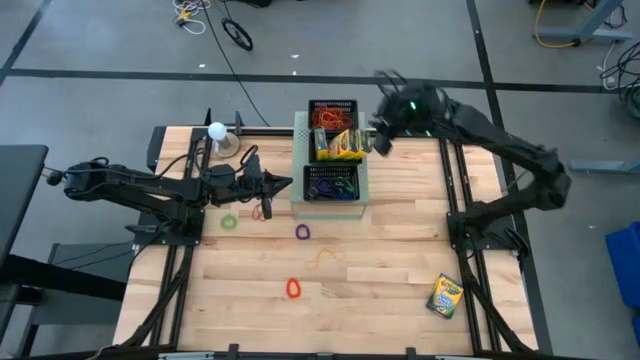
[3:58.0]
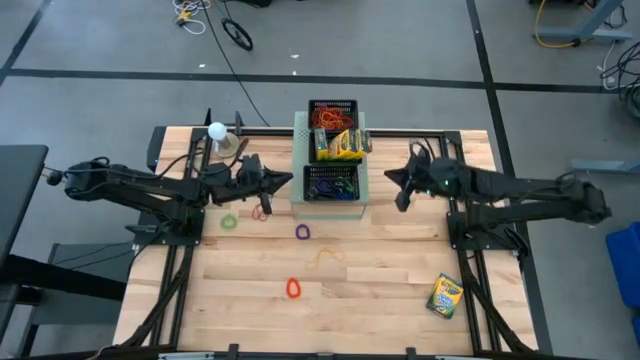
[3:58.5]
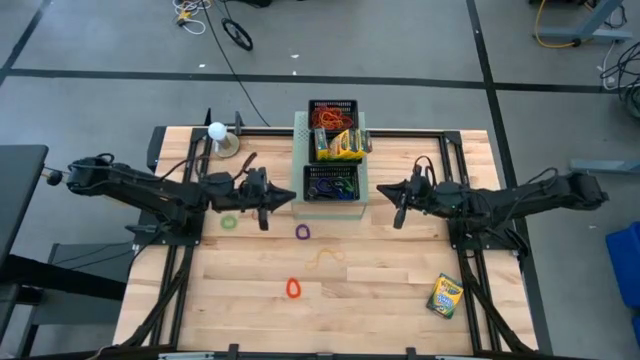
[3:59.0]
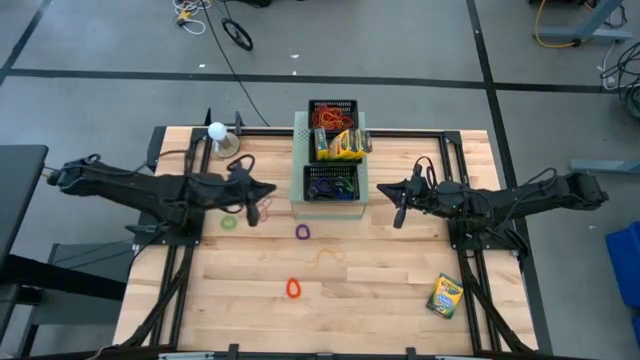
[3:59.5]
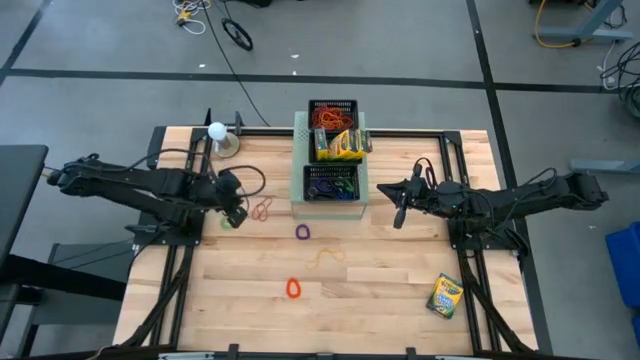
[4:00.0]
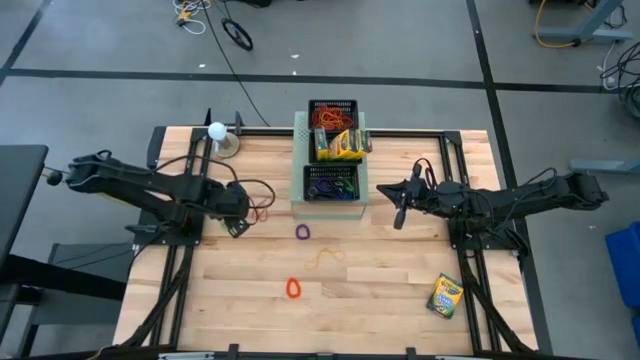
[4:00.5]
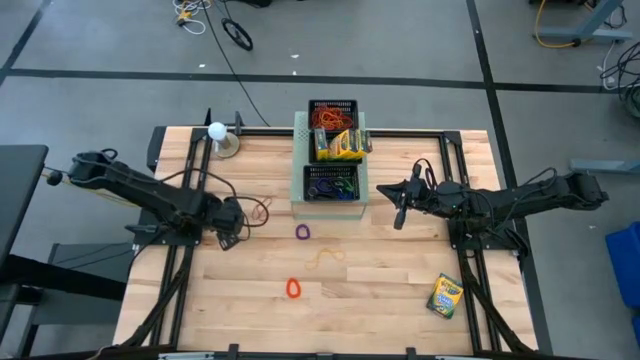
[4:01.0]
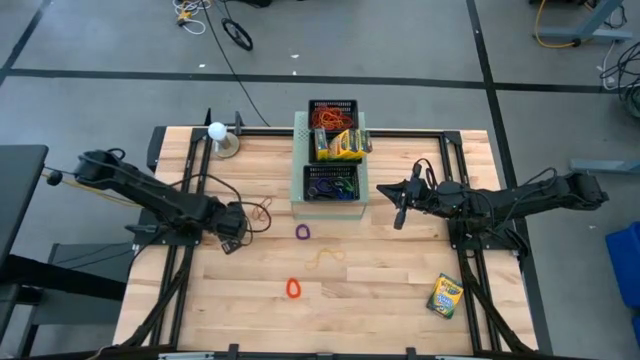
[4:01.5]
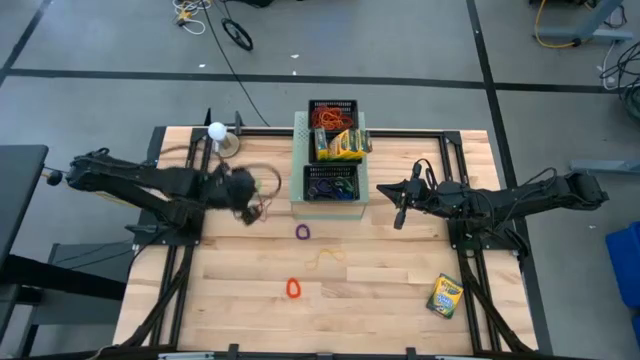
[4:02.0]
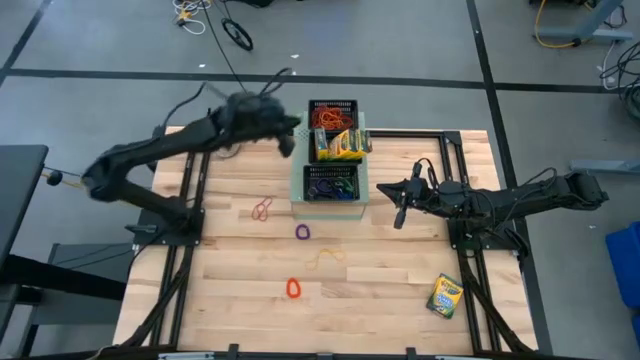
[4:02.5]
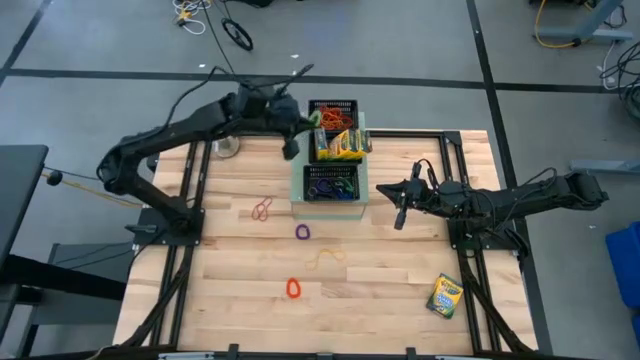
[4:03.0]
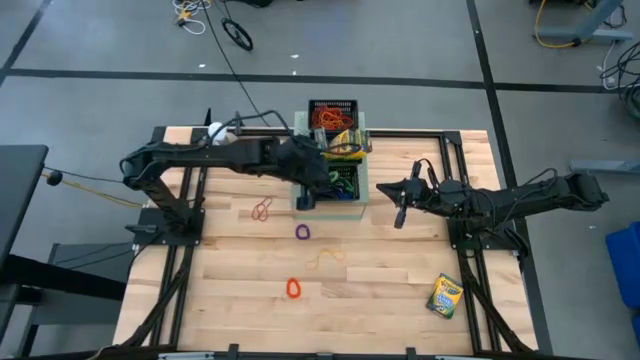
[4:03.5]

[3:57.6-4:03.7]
Task: Pick & Place Office Desk Supplies
Put the green spring keychain into the bottom black bin on the shelf

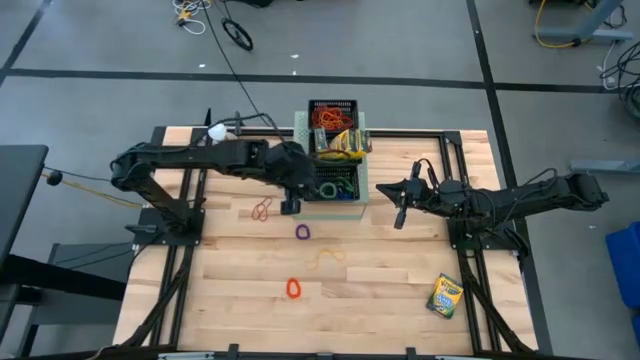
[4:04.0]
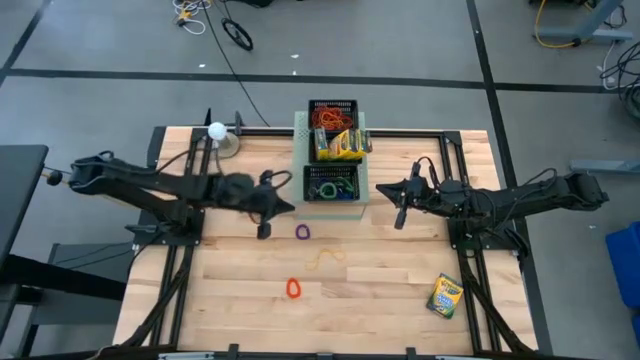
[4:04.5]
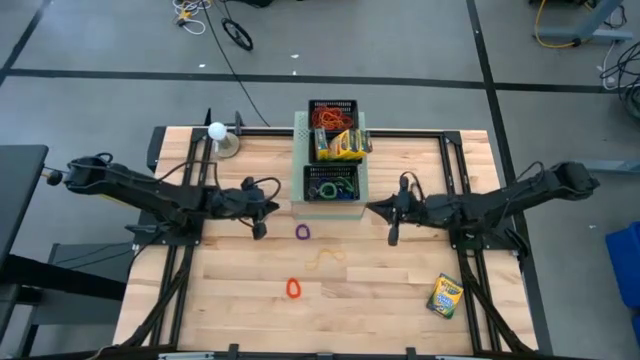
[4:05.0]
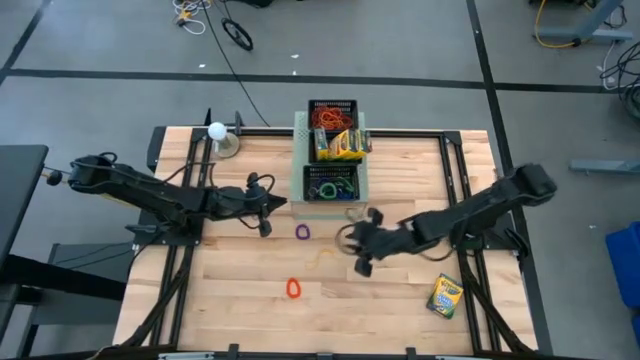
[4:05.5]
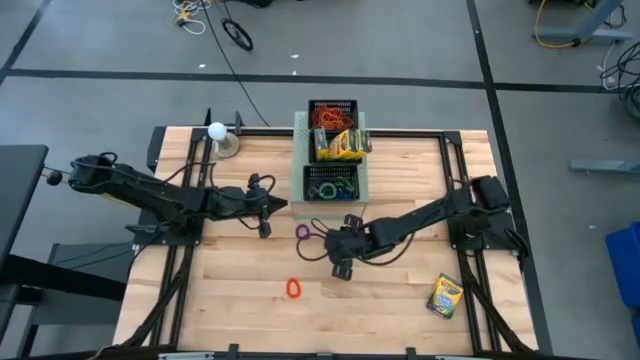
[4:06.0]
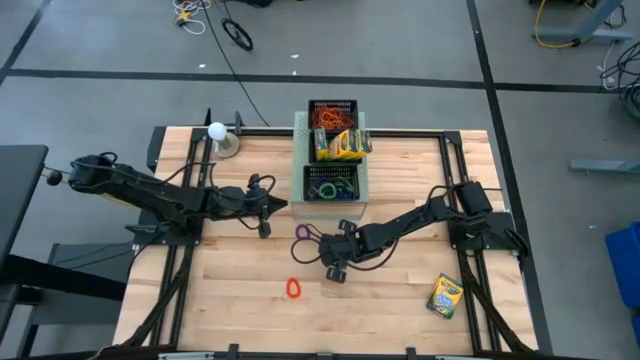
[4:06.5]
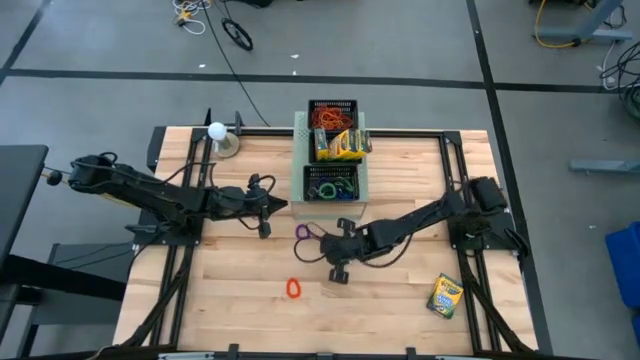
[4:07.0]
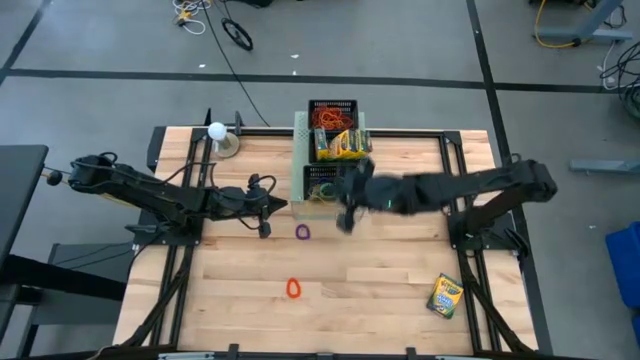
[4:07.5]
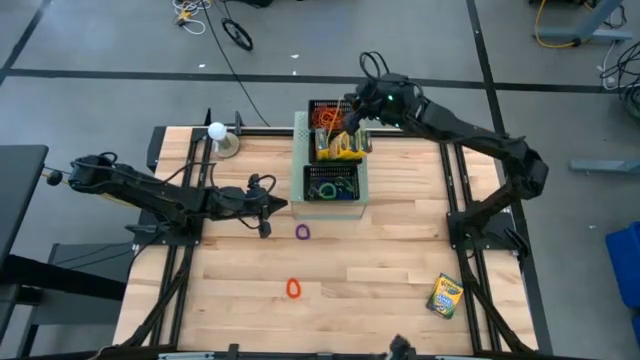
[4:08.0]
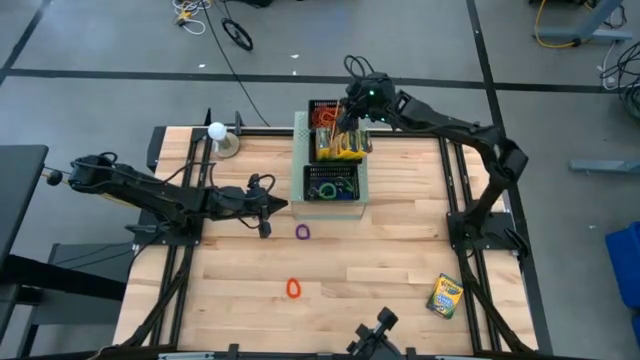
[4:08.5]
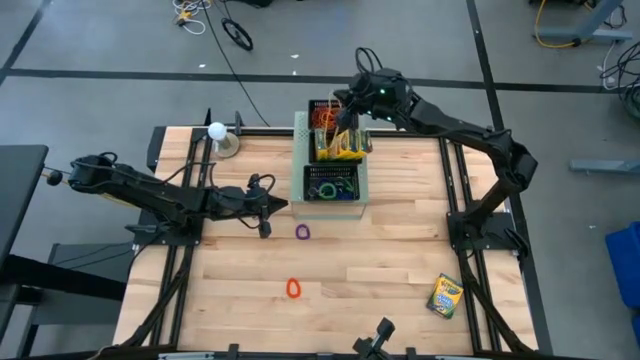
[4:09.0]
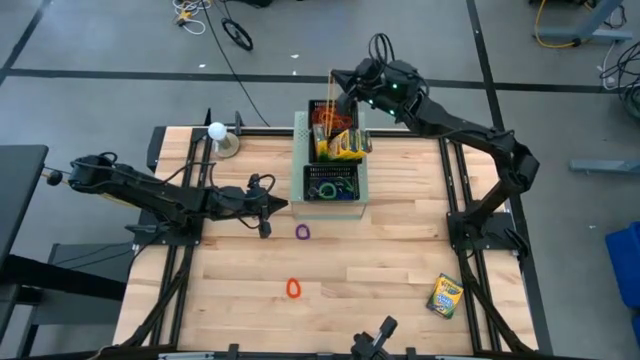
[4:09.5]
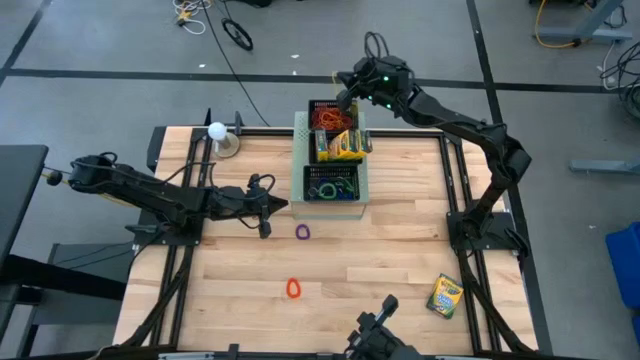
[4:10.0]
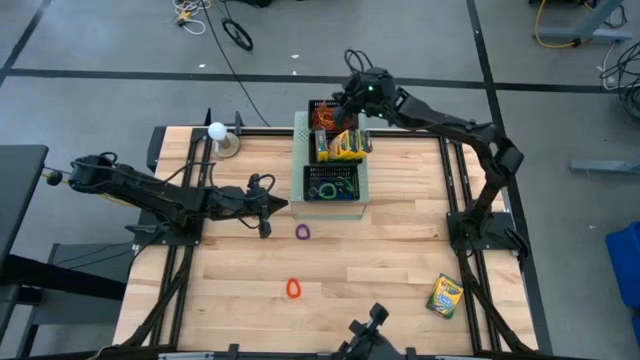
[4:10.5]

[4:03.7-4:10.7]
Put the yellow rubber band into the top black bin on the shelf

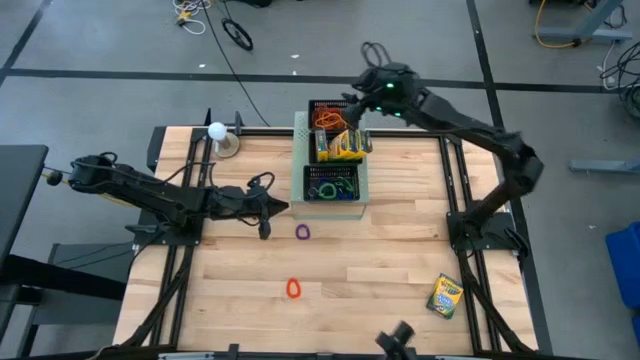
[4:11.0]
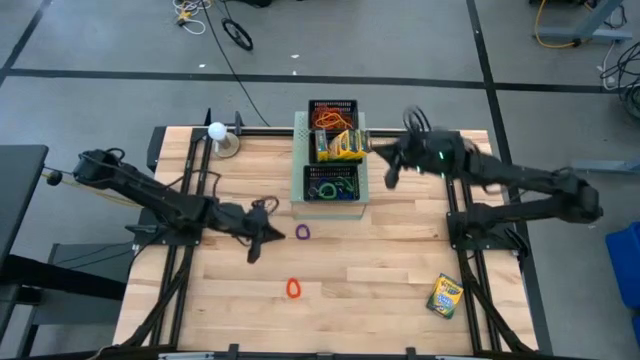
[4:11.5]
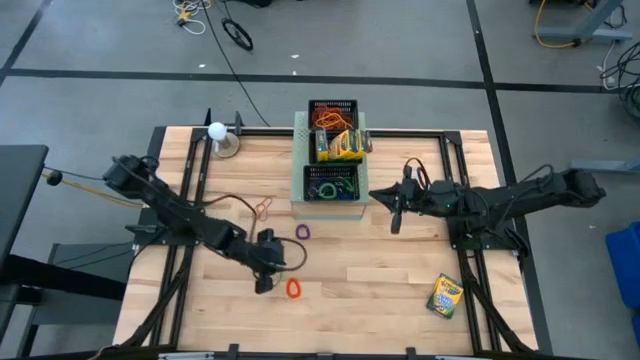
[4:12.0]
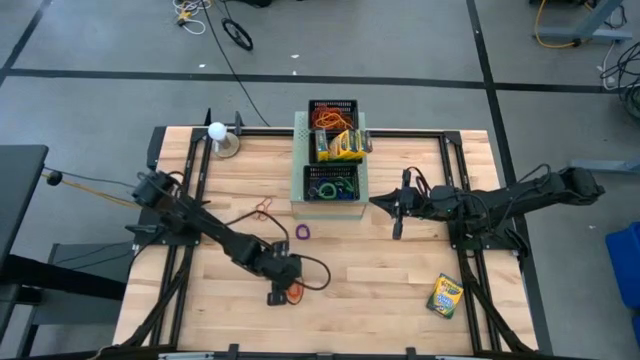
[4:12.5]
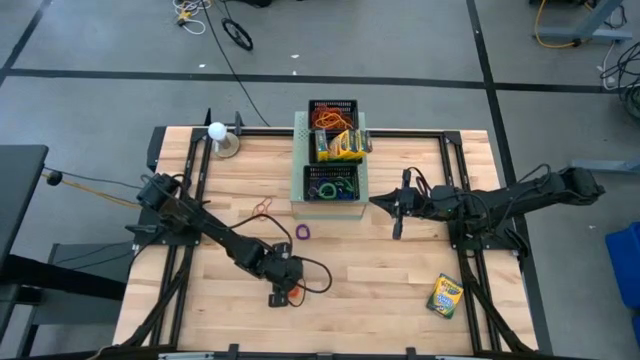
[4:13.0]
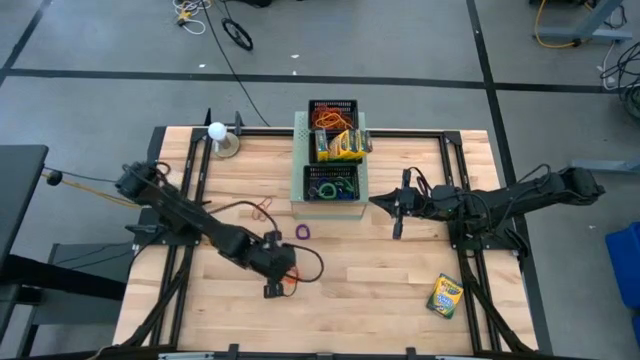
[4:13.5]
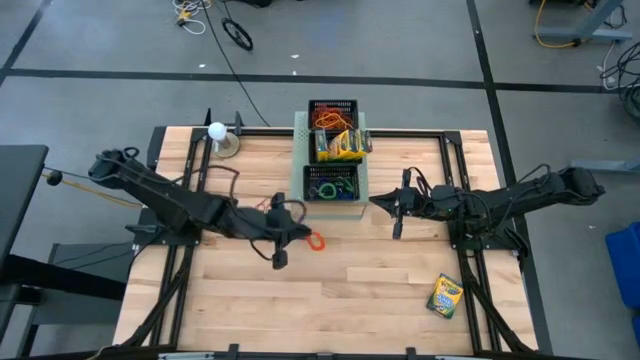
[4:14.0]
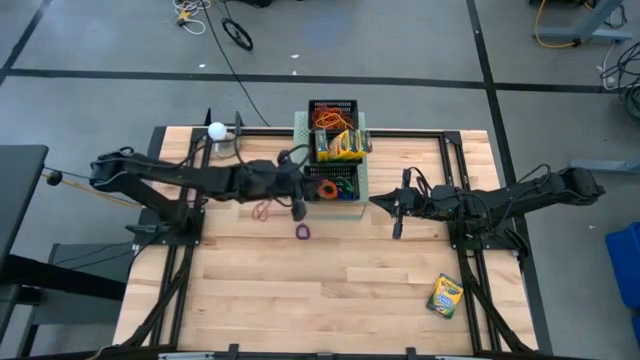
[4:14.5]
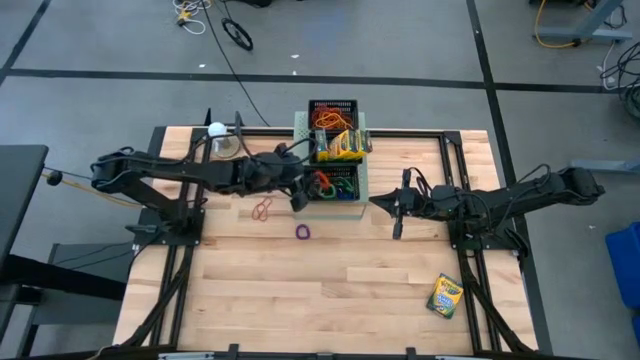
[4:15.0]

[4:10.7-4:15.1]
Put the orange spring keychain into the bottom black bin on the shelf

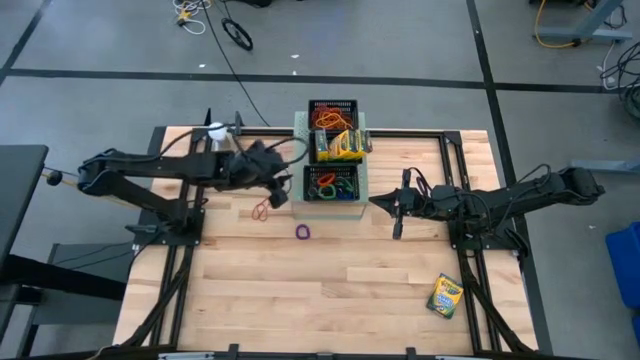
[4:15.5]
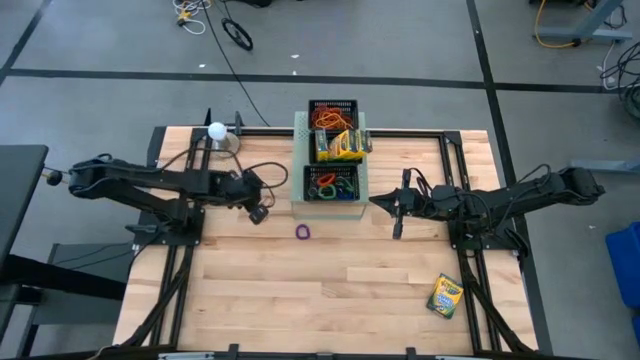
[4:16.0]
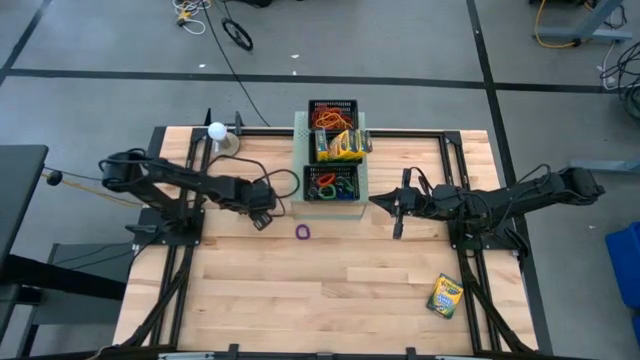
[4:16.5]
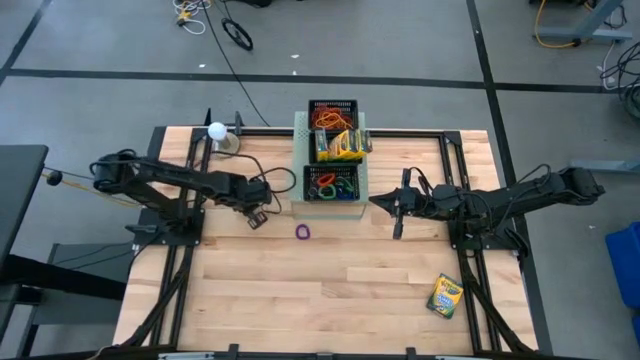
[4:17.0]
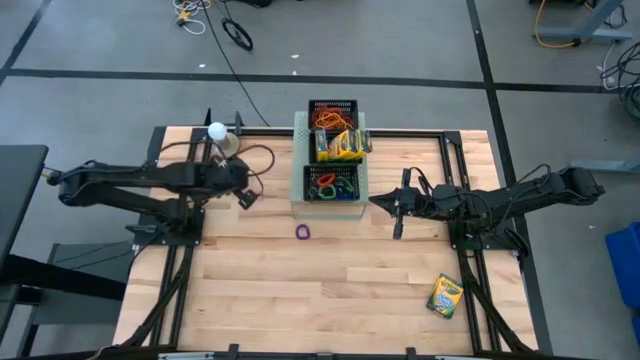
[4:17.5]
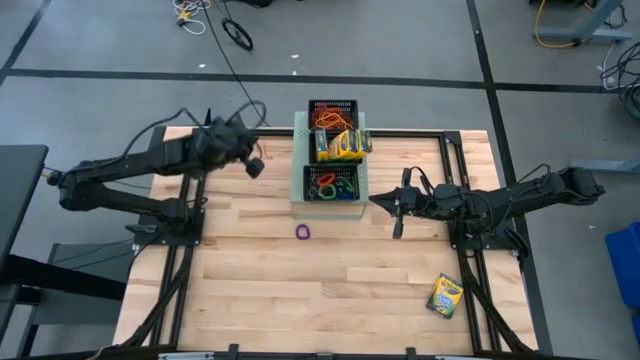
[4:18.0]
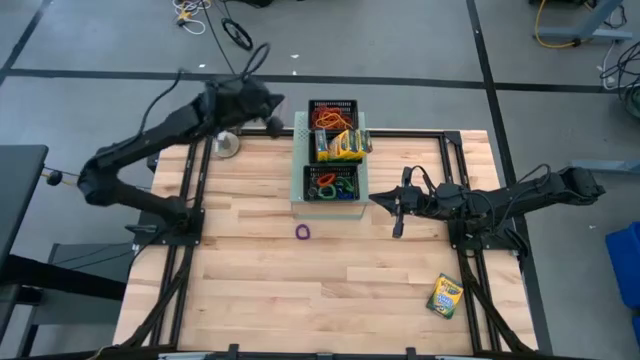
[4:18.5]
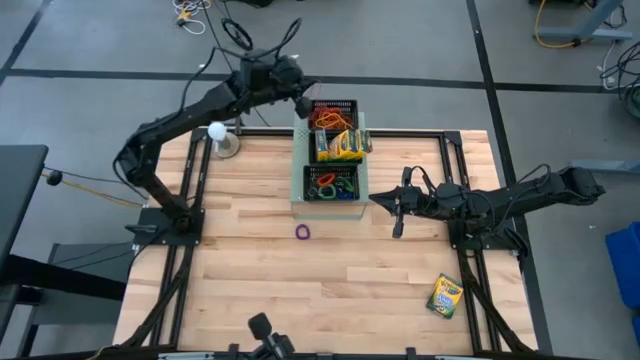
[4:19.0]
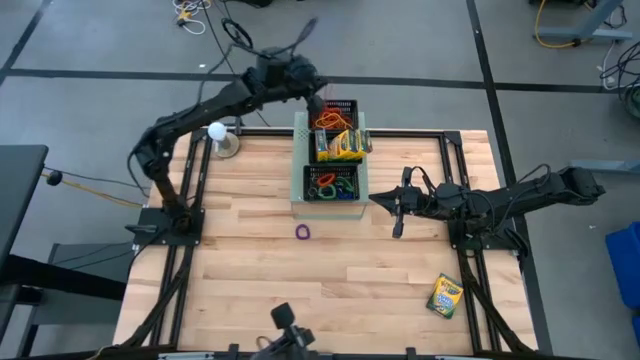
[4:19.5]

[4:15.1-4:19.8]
Put the red rubber band into the top black bin on the shelf
